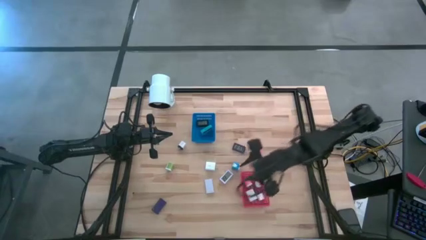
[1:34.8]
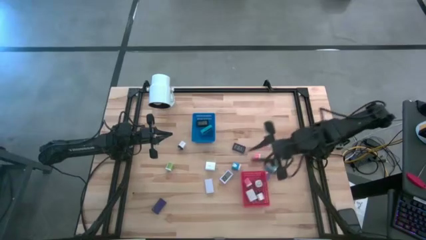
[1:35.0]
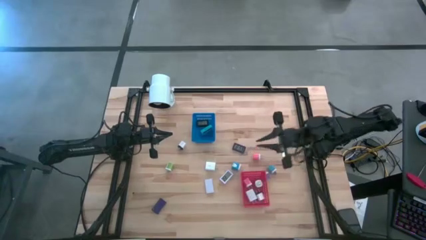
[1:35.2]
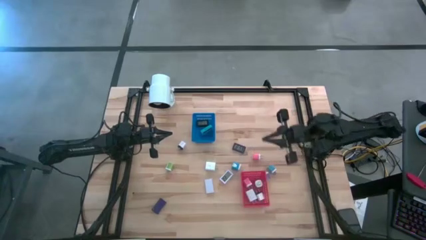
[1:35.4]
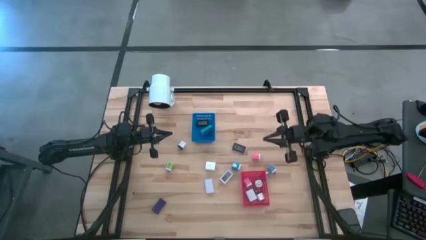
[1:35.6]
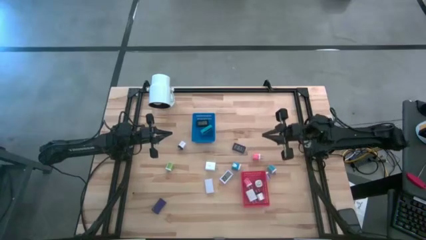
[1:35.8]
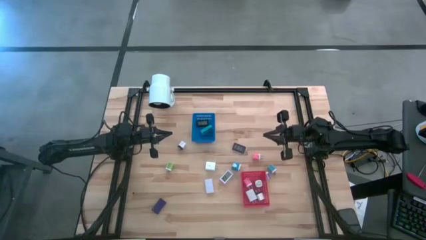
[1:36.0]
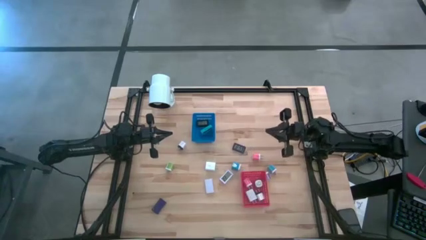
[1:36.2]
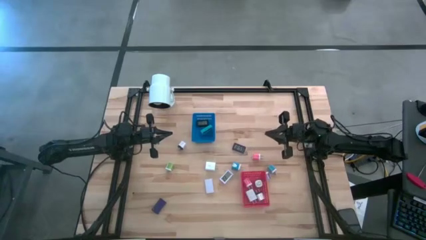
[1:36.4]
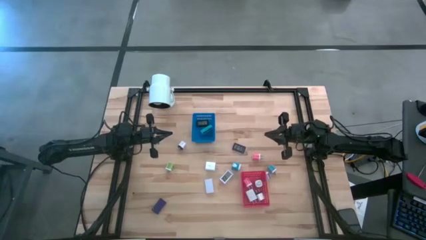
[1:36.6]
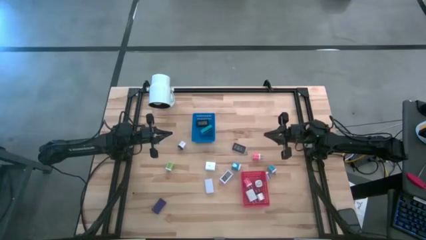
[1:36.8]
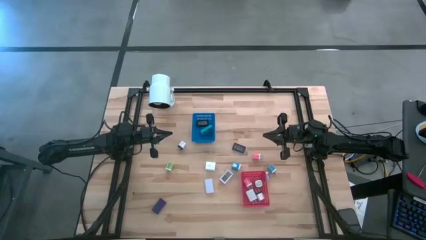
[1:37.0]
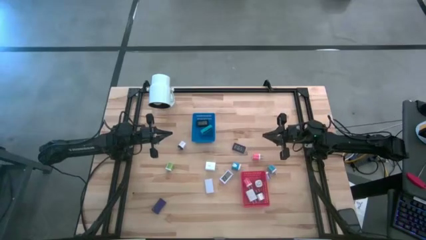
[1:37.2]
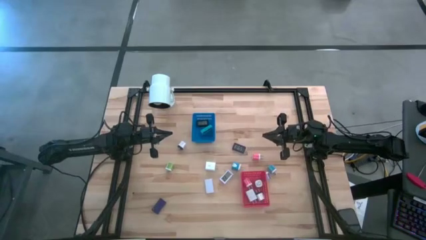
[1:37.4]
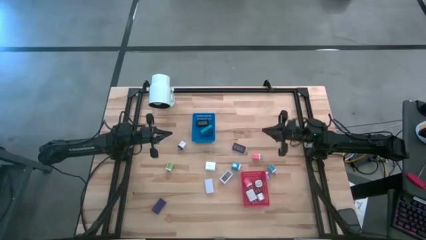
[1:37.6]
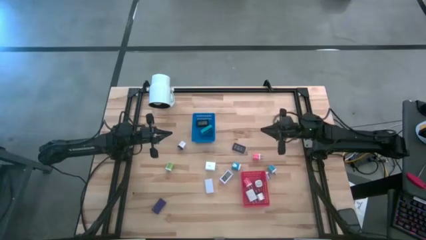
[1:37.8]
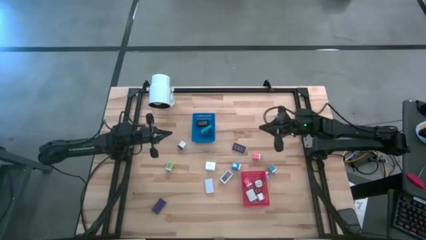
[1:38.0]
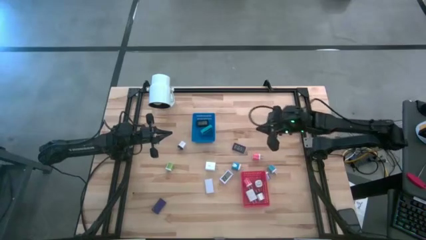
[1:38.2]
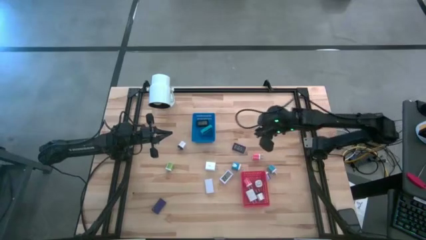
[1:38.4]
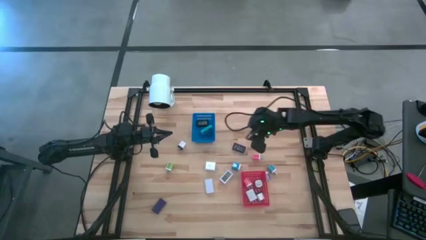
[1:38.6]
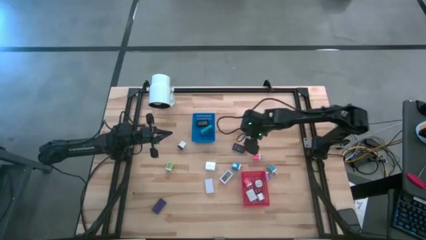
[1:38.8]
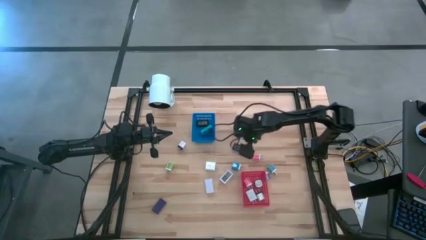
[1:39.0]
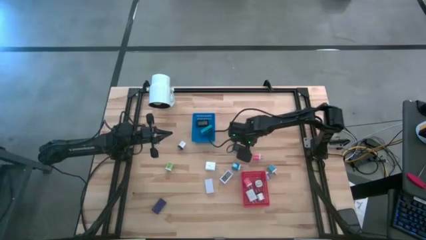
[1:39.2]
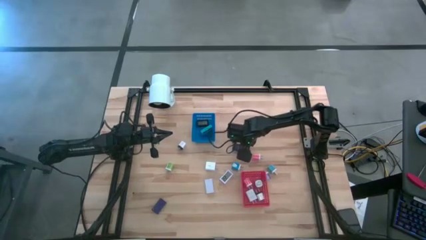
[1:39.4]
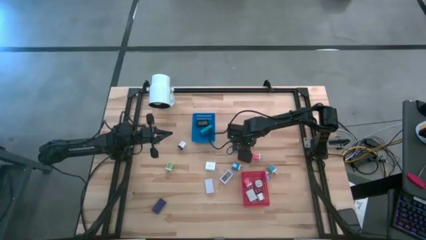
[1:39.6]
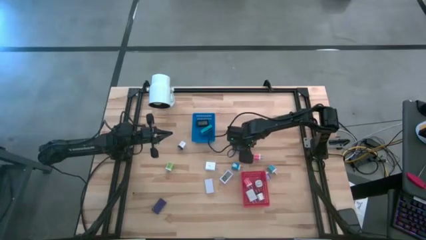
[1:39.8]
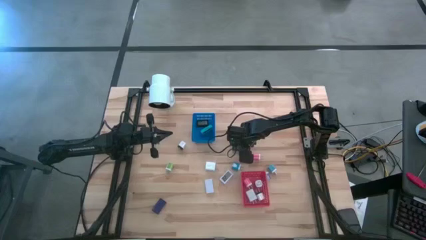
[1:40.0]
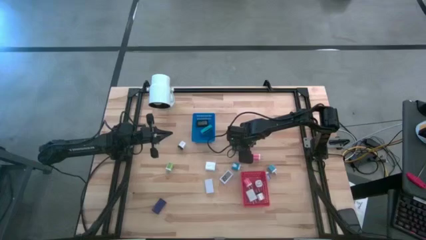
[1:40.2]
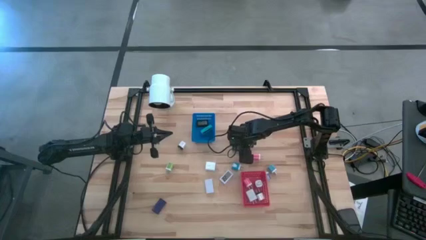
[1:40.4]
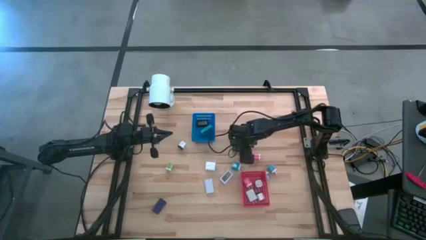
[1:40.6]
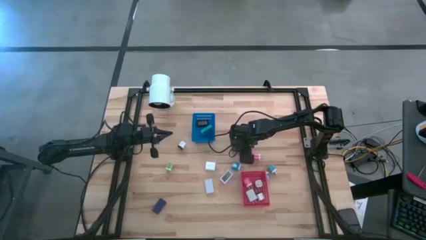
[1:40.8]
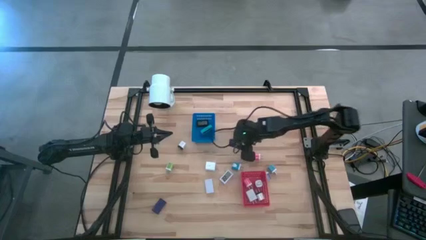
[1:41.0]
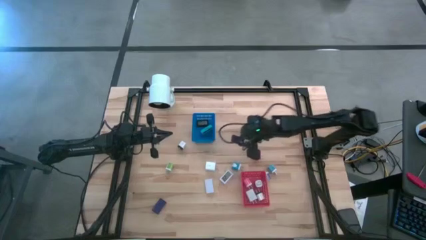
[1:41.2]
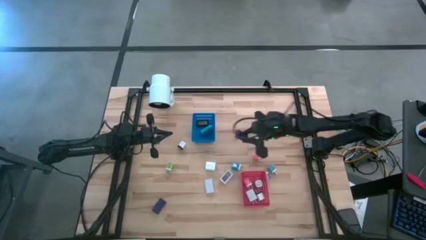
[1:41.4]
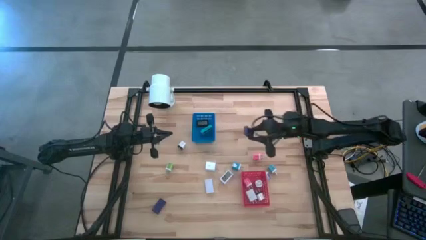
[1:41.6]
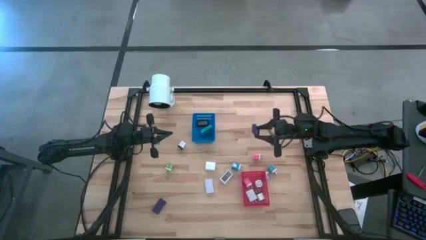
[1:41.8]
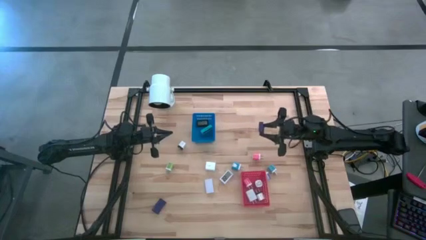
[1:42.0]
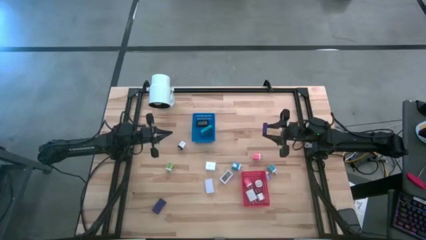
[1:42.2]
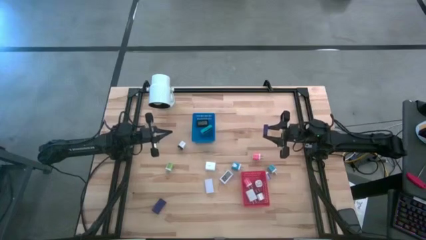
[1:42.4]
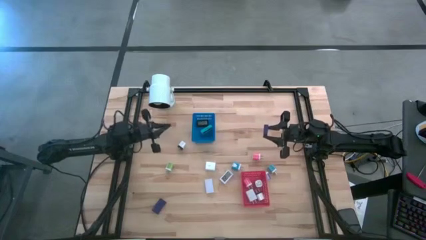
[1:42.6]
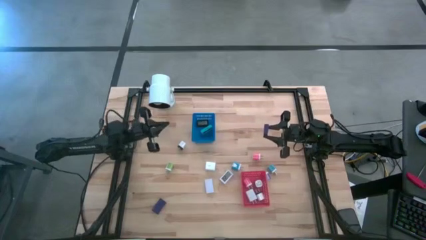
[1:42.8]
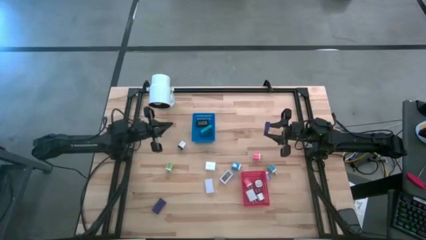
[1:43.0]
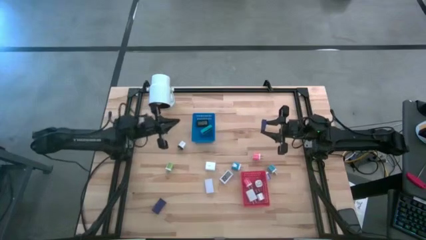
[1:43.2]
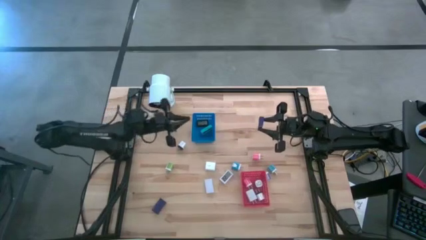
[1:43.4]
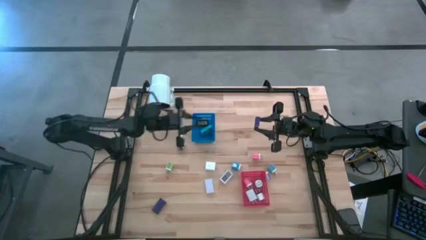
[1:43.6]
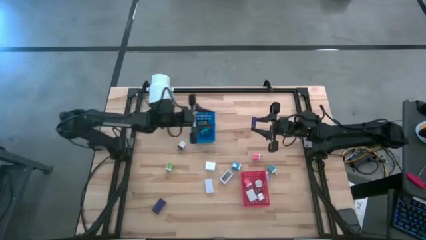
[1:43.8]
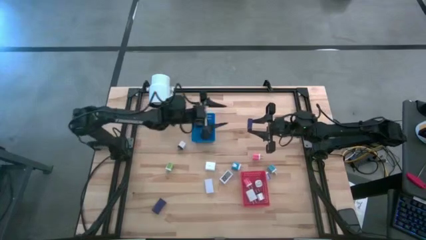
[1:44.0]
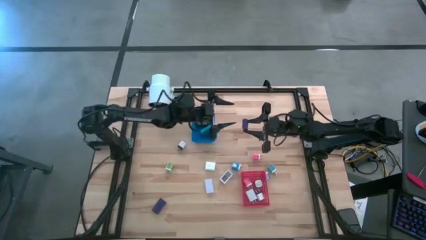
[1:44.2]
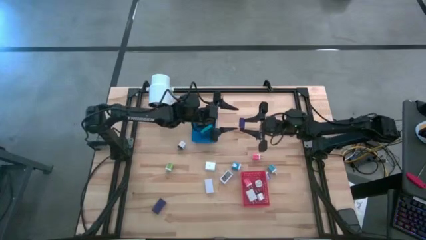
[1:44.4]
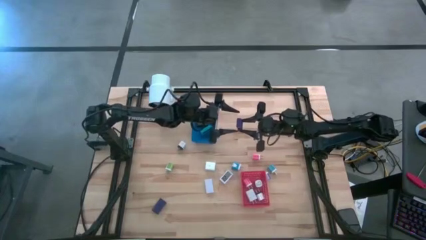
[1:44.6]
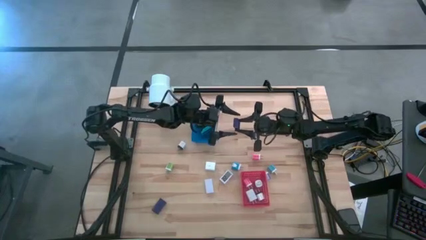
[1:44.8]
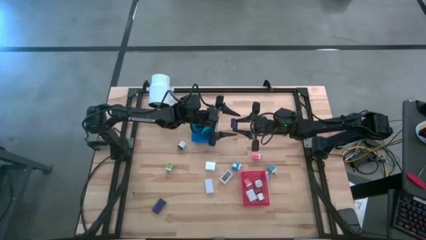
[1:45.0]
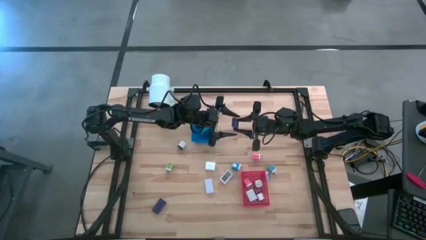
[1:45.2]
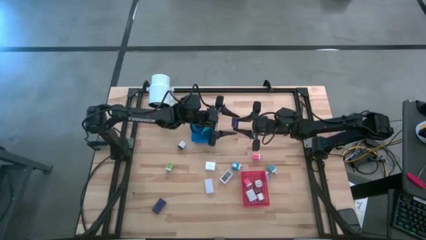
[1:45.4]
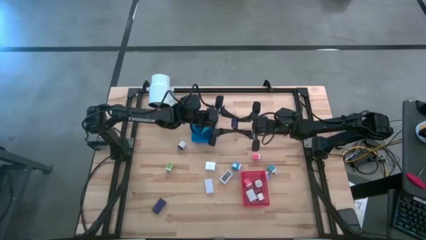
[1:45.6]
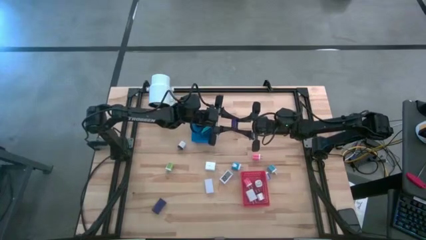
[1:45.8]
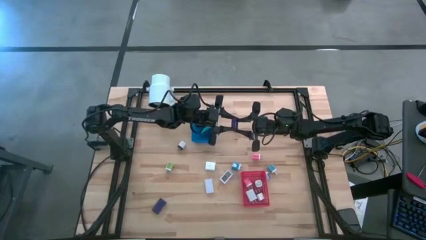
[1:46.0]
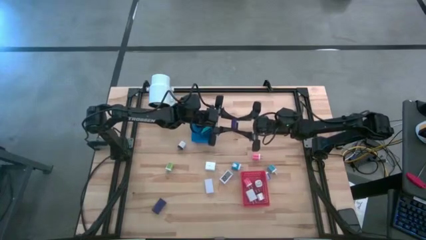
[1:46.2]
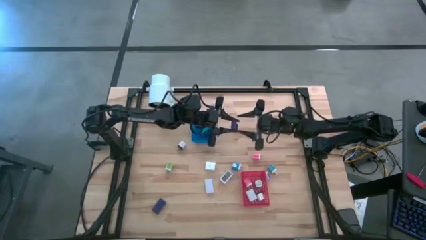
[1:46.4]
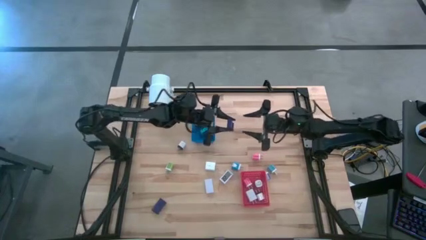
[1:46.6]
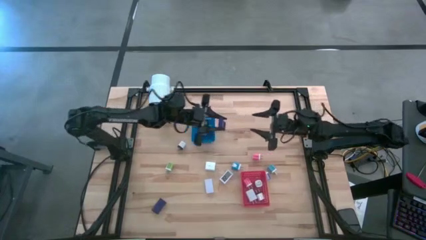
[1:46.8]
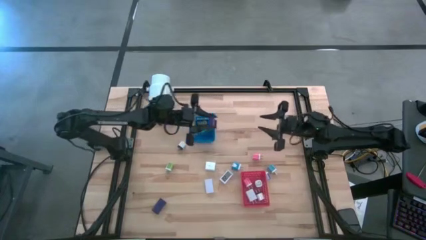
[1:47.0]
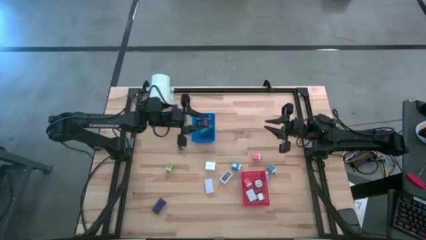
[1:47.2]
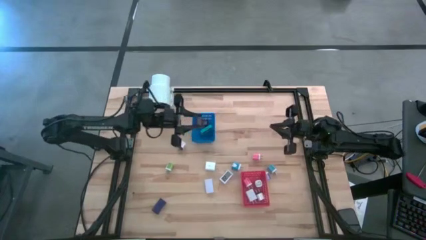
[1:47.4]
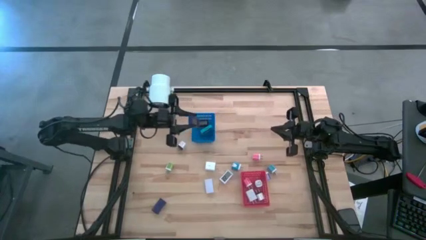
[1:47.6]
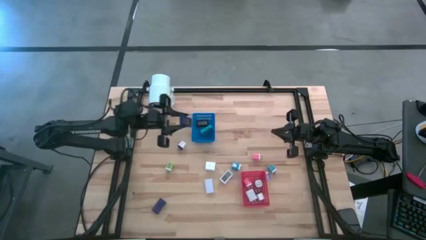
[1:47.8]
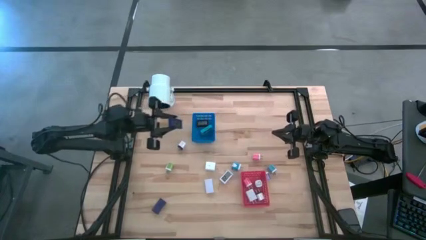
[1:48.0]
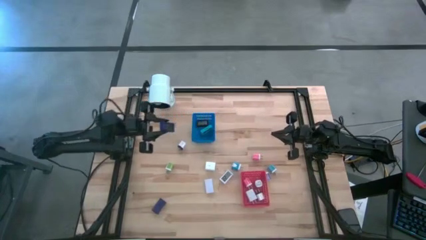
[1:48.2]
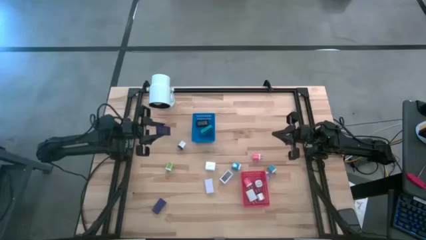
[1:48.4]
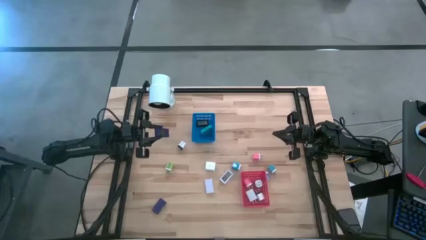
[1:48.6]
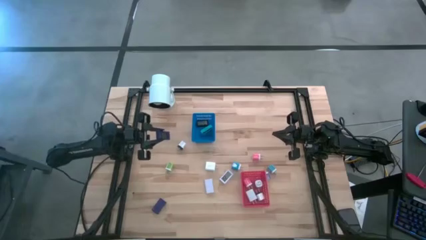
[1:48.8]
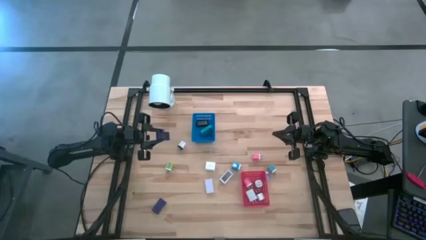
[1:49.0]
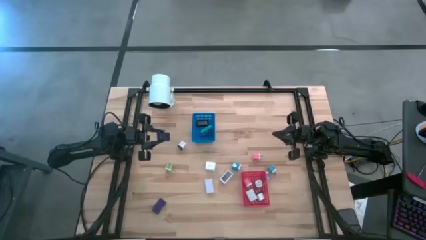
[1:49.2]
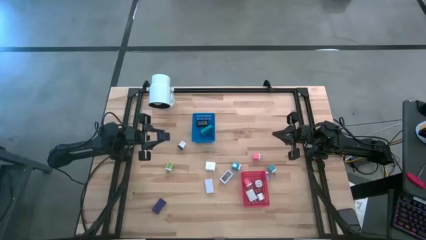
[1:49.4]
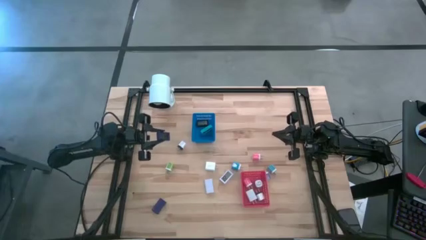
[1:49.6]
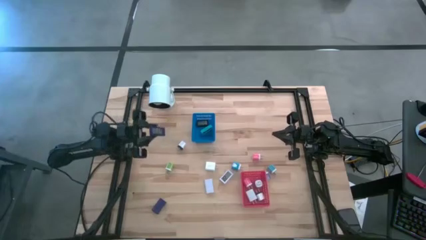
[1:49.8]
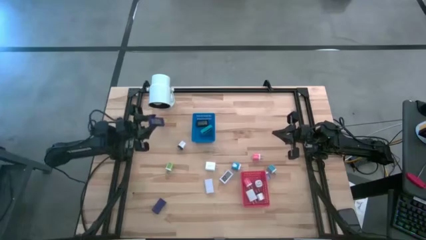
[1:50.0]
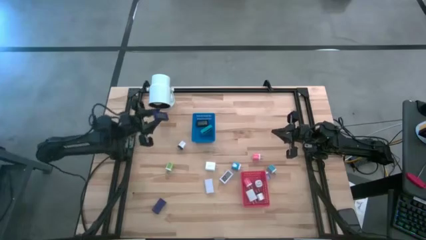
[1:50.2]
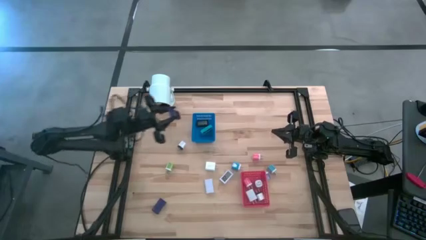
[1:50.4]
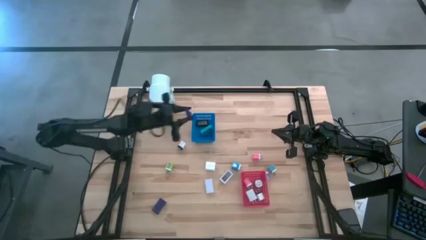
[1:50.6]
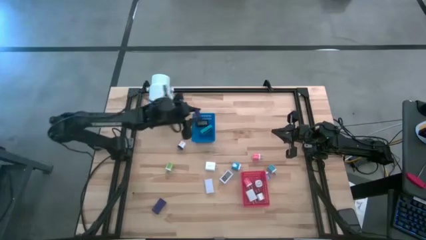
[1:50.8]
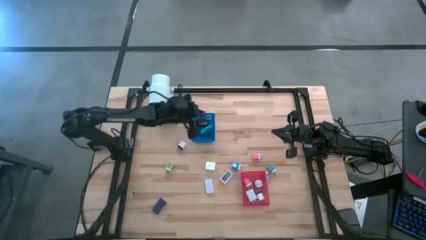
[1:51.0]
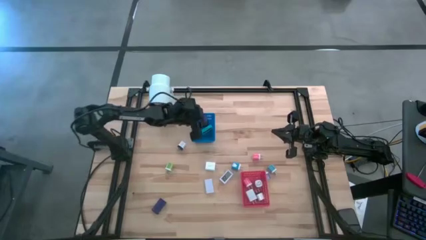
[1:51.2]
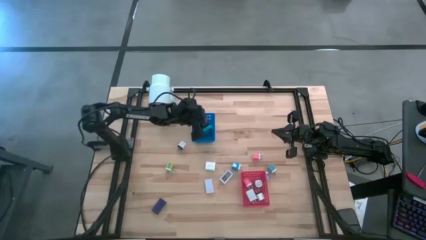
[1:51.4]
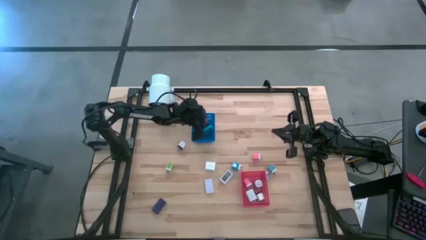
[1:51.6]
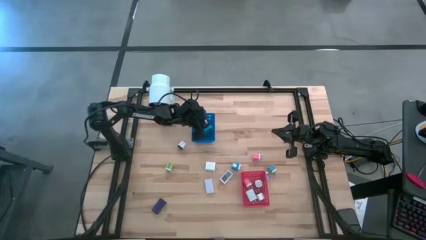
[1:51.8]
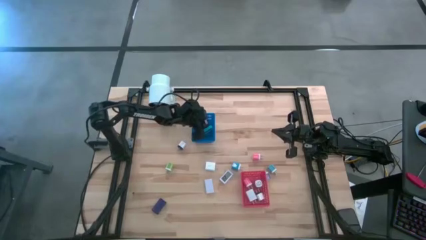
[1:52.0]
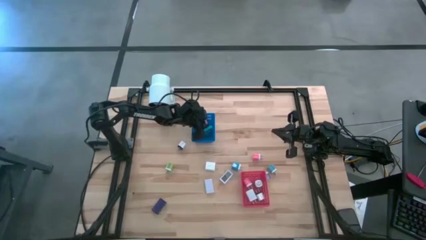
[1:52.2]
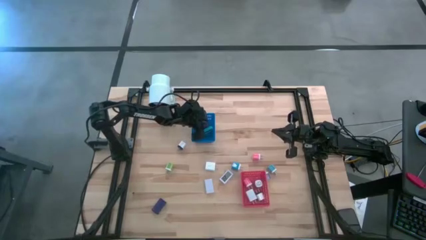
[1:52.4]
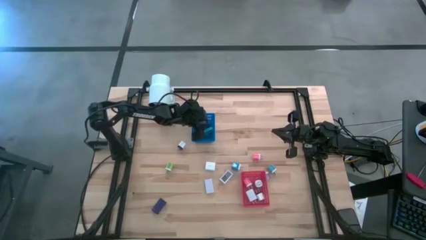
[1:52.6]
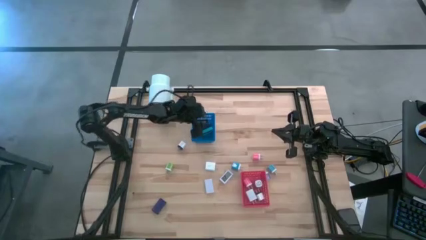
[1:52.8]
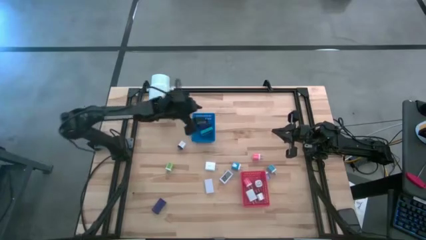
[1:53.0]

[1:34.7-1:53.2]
Task: Pick & Place Office items
Put the right dark blue digital clock into the blue bin
